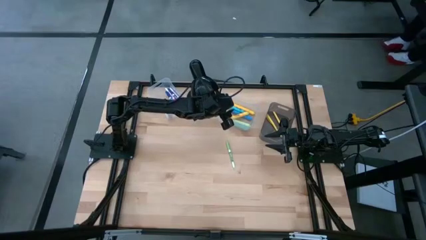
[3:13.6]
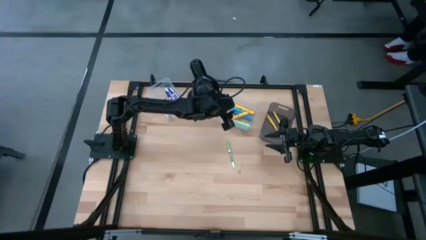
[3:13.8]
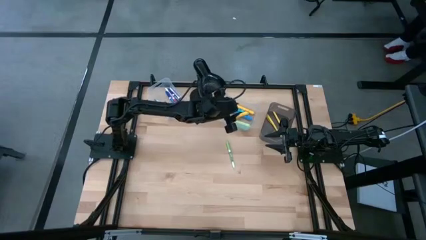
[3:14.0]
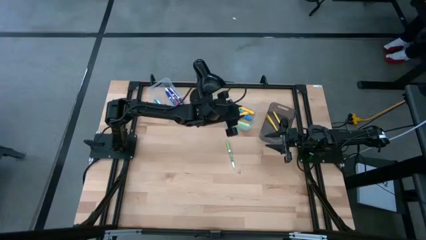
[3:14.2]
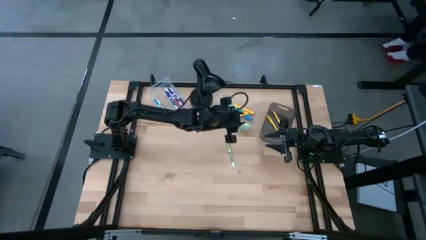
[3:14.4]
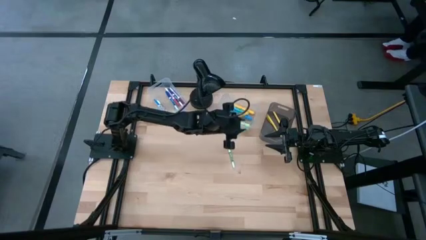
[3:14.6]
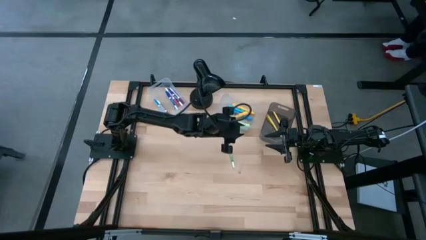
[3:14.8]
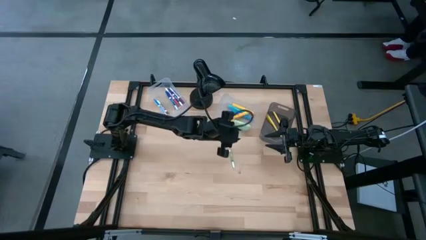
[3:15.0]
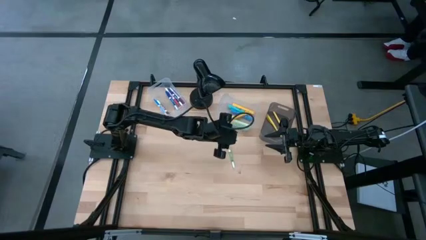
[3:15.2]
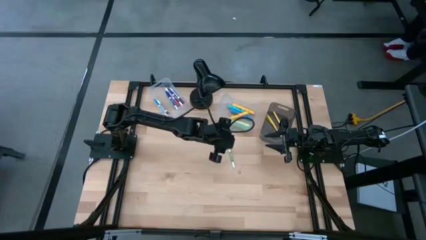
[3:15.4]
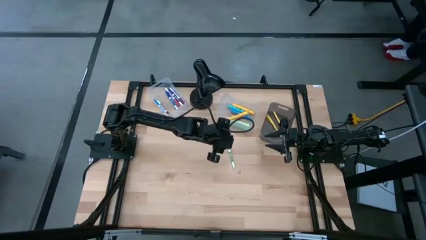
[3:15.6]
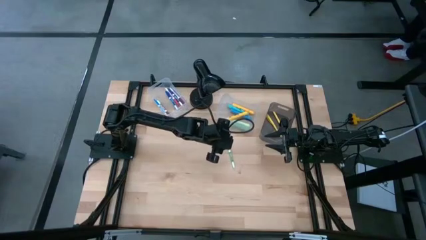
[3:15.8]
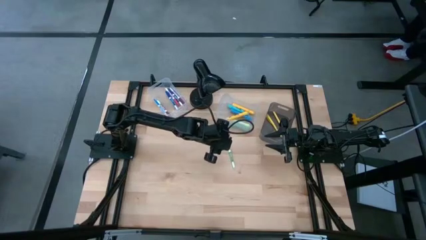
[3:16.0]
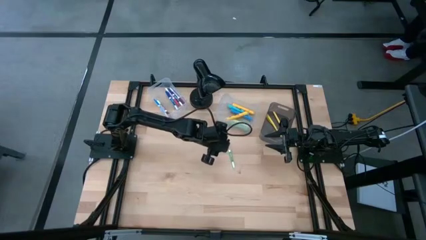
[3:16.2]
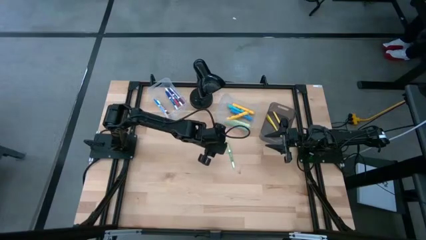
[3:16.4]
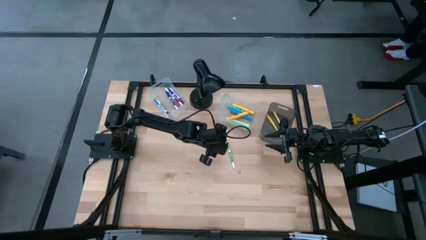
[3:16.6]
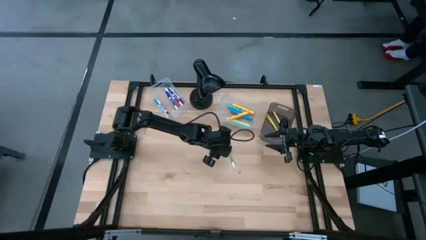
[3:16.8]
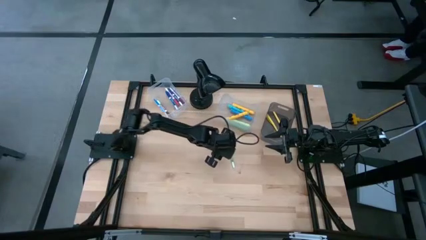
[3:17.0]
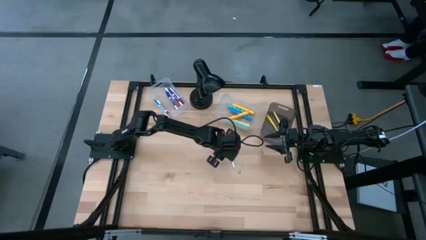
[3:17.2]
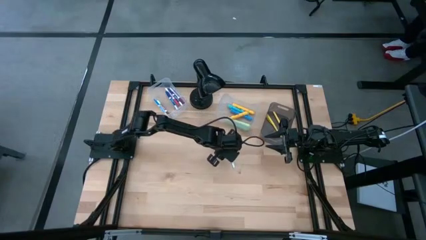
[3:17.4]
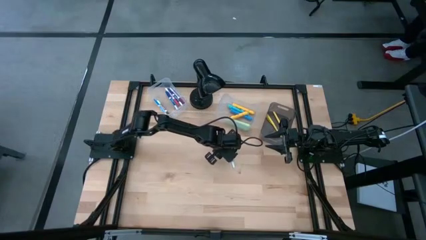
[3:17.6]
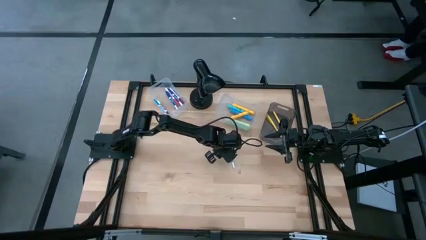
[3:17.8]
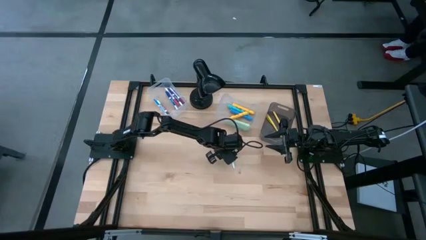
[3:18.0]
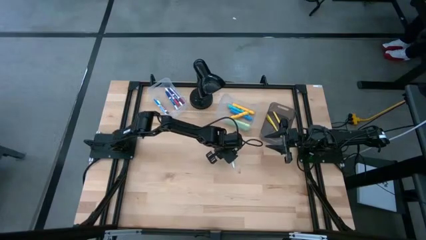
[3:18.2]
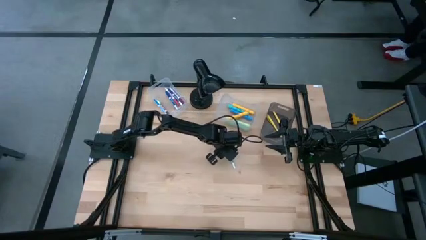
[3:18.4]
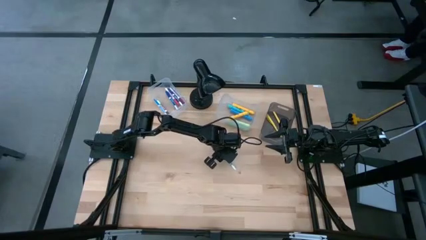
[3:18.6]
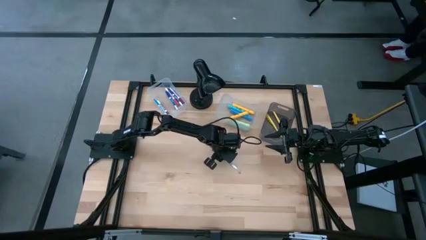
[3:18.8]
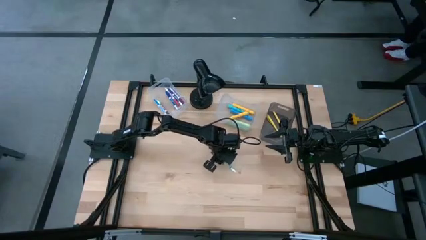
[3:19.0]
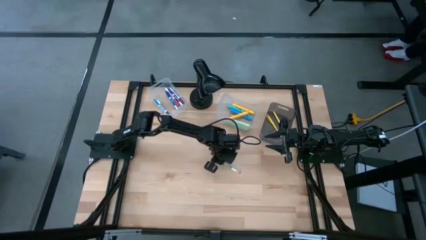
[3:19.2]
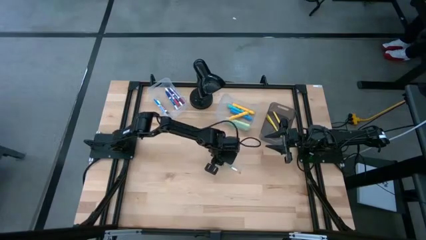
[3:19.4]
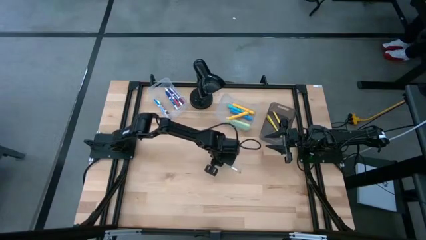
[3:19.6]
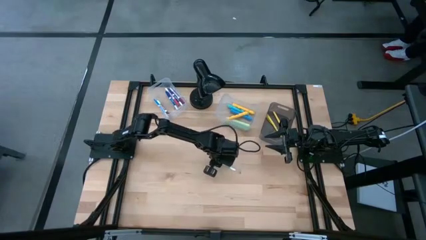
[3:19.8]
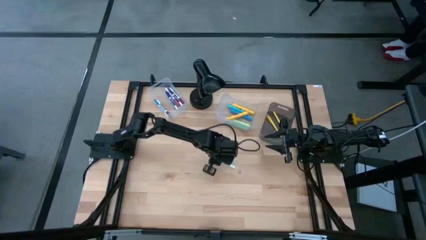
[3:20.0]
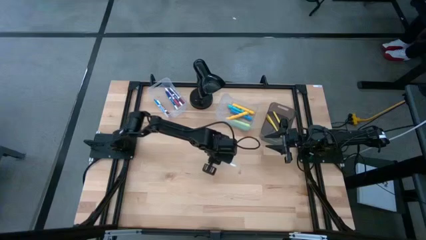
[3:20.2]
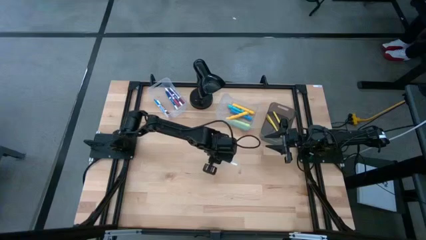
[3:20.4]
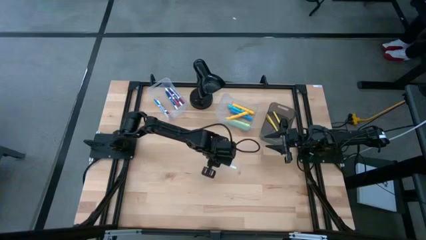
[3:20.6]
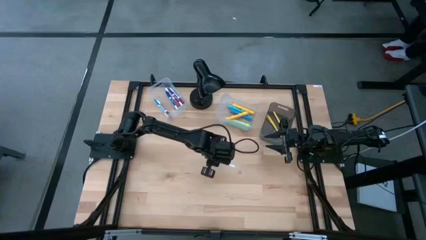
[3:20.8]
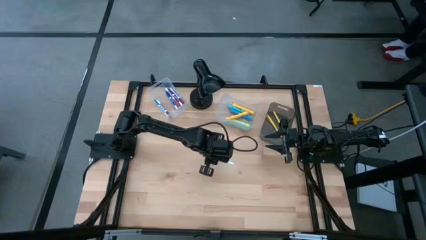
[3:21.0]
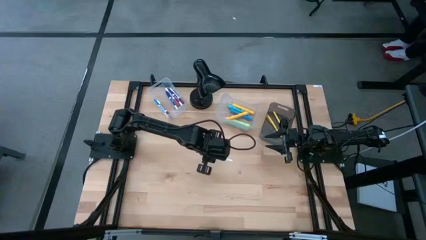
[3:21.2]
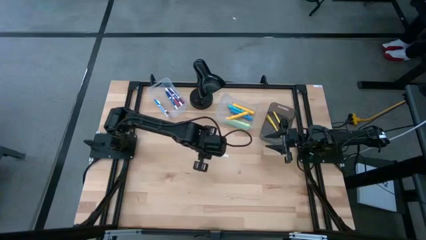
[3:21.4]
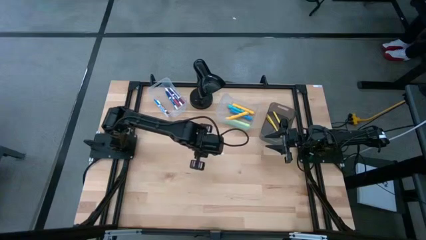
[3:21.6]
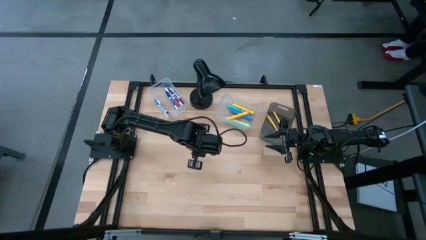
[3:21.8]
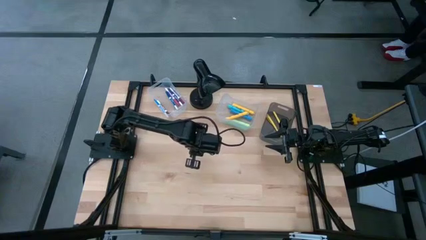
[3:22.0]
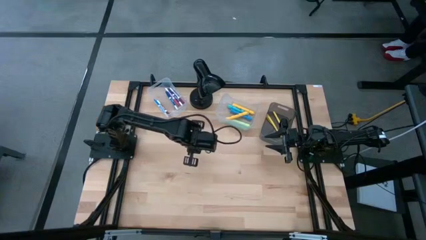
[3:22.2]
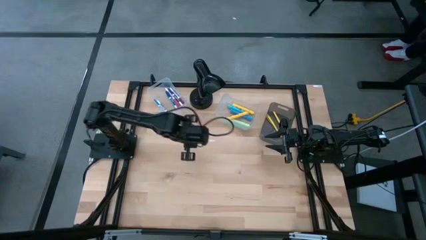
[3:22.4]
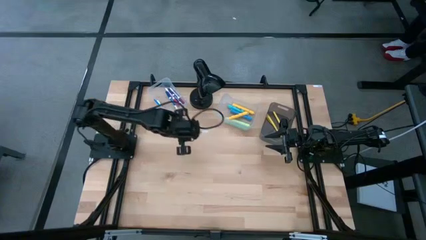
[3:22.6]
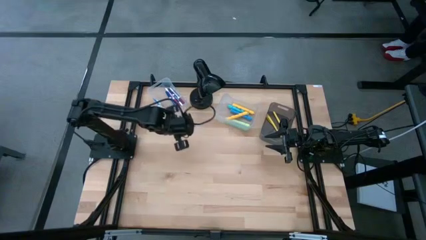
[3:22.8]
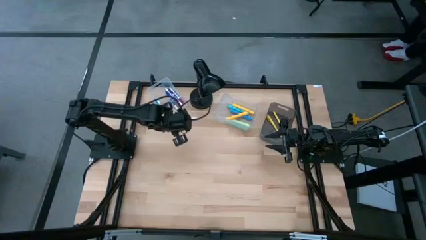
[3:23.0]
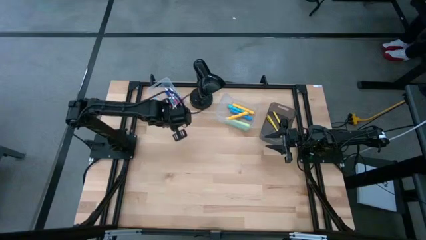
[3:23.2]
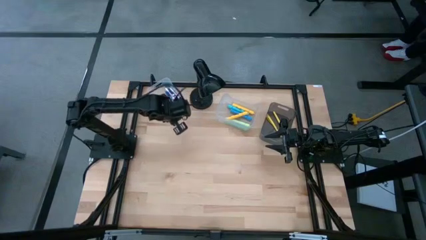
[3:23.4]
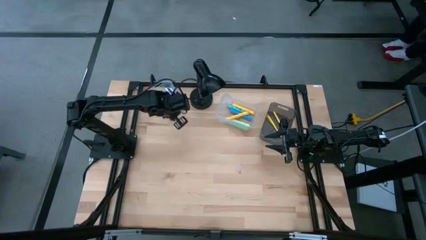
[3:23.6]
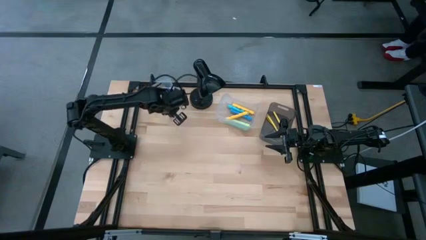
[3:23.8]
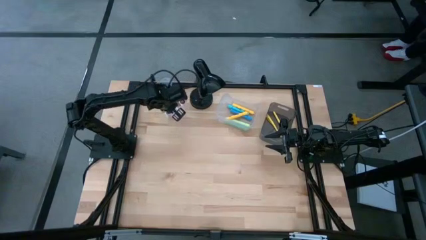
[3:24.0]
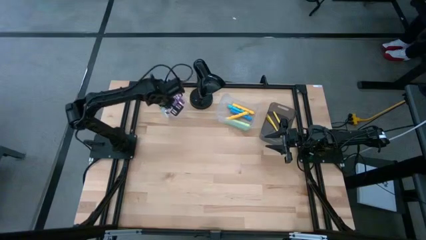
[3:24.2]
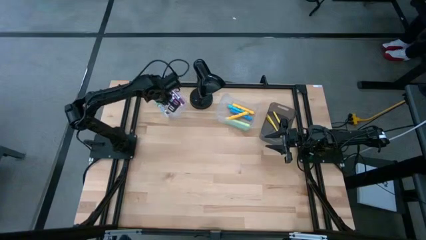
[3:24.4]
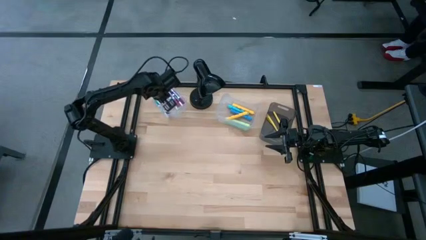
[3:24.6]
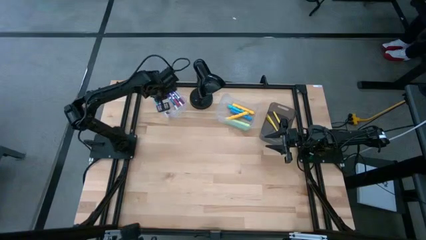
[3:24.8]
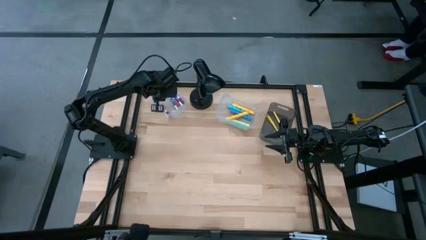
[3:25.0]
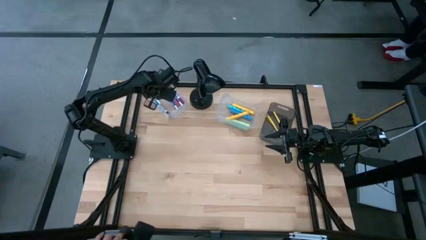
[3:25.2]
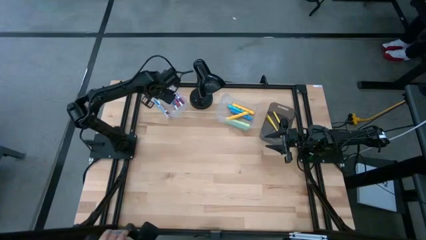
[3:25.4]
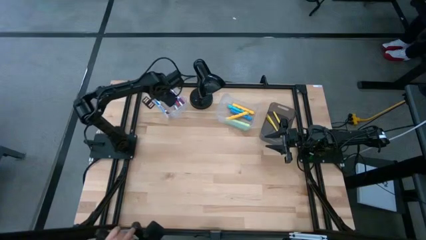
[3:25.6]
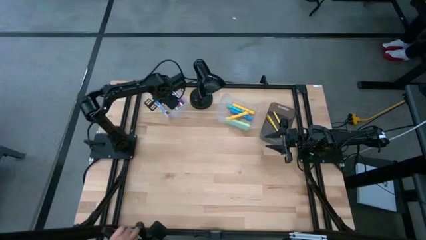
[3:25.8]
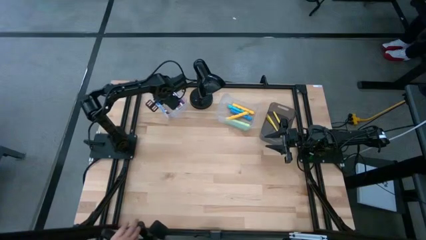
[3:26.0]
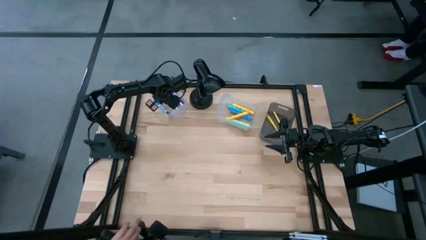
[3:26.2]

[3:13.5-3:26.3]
Task: Pick & Place Markers
Put the green marker in the left transparent bin

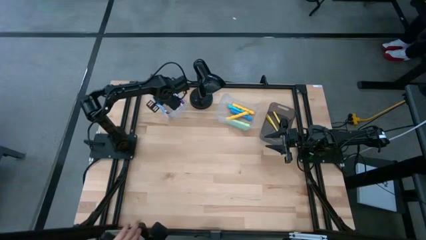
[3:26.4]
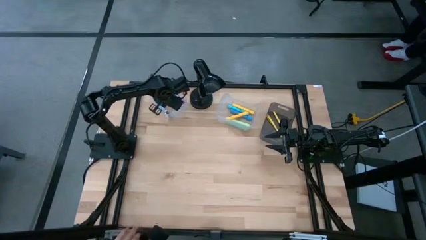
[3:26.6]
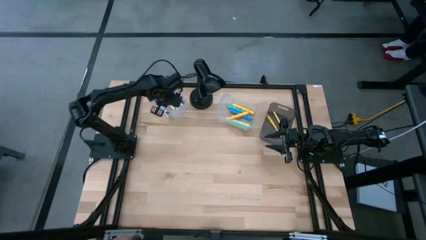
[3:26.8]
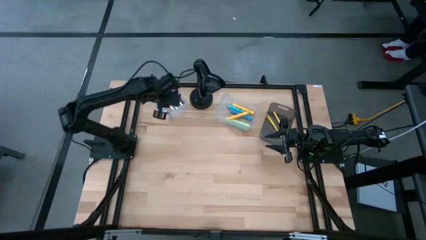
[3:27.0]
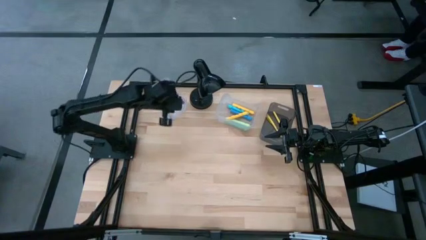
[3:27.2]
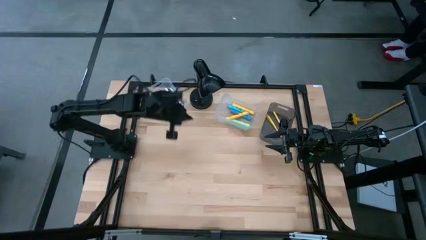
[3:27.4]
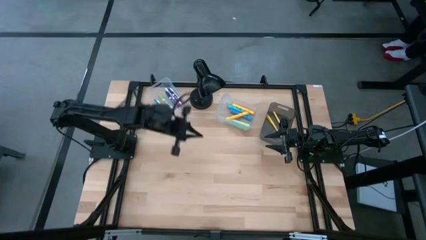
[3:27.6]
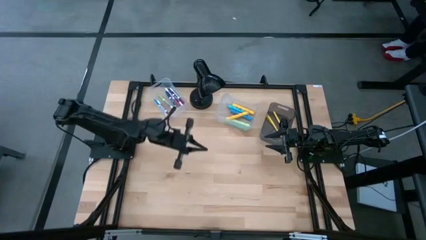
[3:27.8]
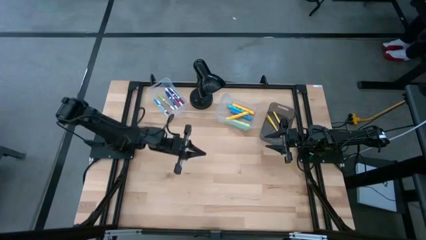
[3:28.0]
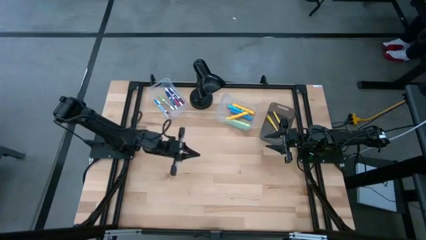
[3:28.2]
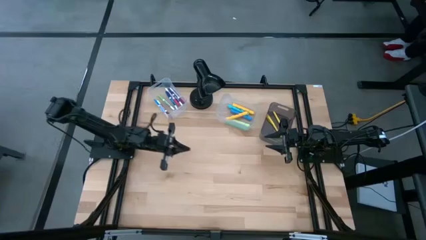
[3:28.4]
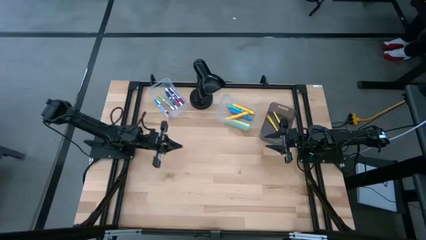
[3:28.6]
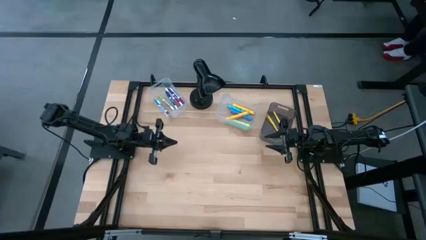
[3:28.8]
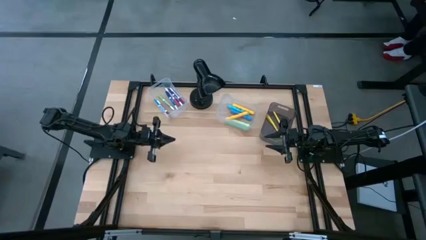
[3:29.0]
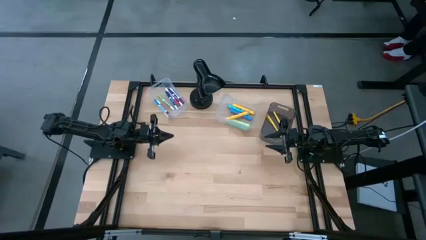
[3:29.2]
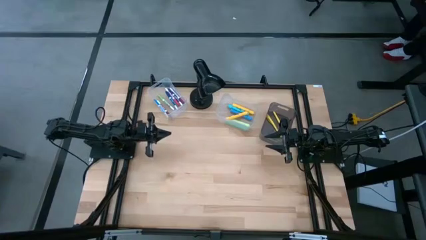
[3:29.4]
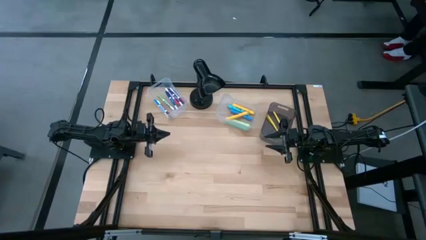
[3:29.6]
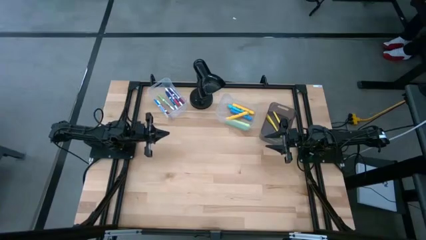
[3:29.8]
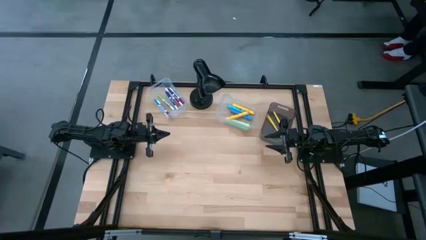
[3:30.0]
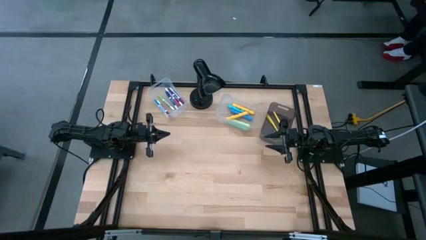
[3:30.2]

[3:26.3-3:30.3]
Return to Home Position
